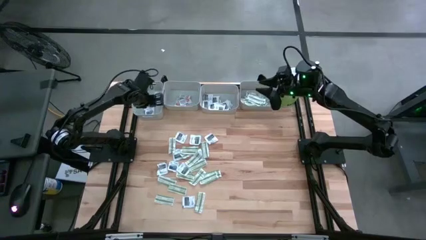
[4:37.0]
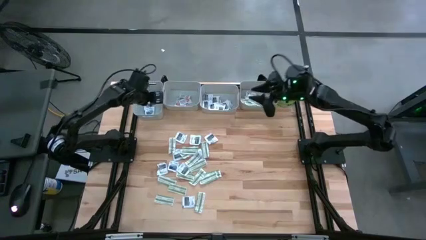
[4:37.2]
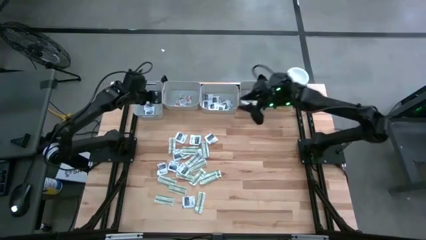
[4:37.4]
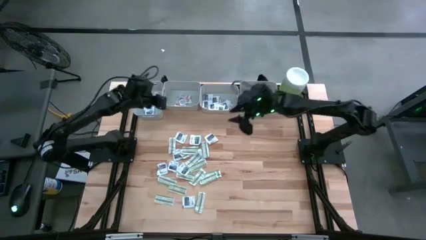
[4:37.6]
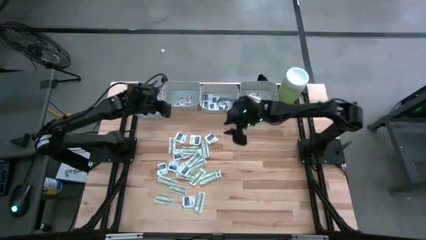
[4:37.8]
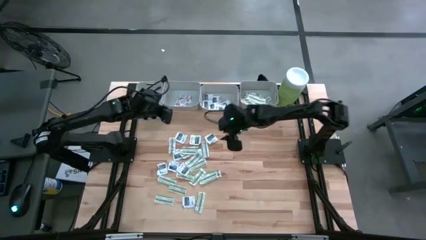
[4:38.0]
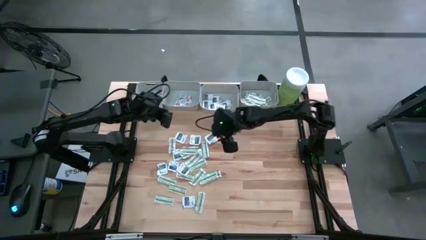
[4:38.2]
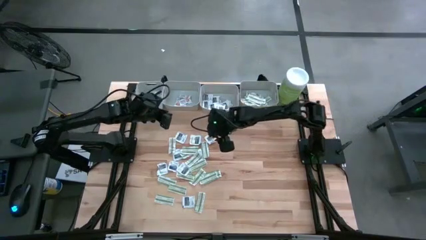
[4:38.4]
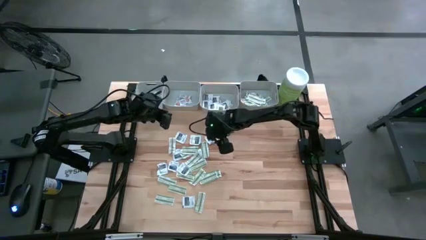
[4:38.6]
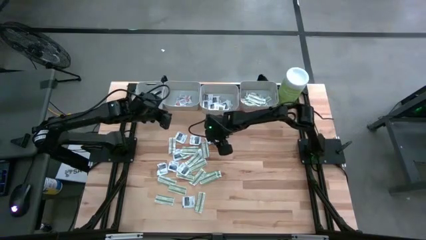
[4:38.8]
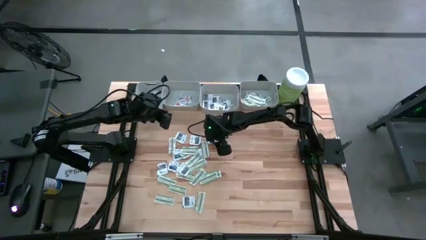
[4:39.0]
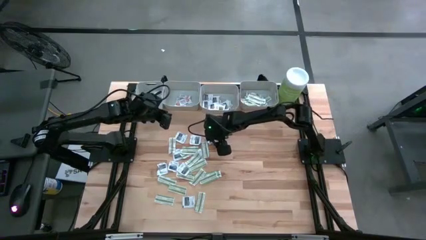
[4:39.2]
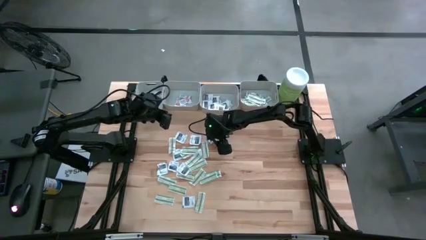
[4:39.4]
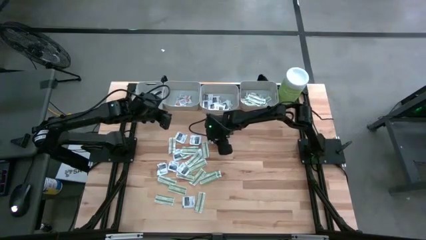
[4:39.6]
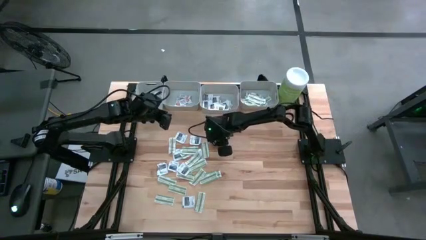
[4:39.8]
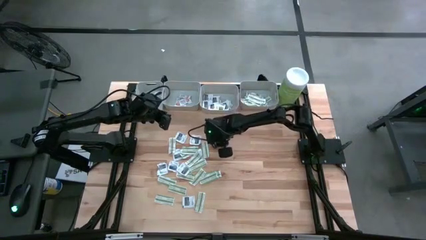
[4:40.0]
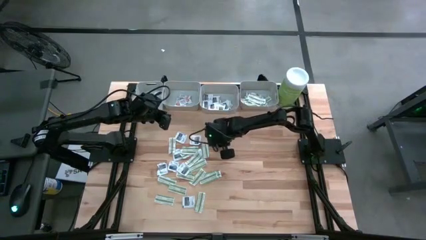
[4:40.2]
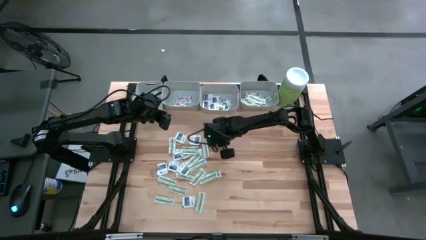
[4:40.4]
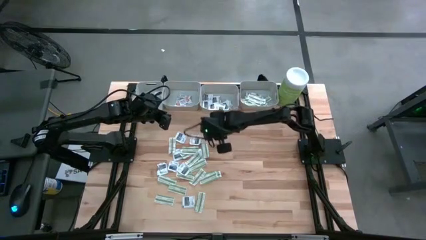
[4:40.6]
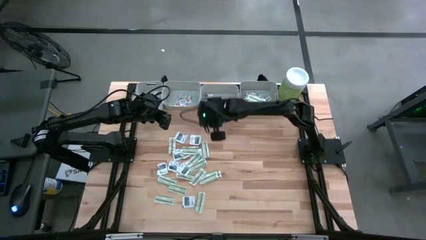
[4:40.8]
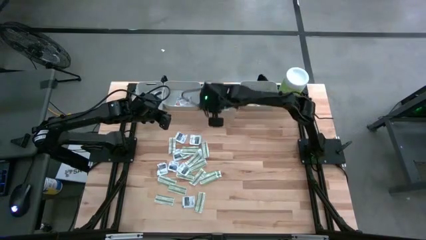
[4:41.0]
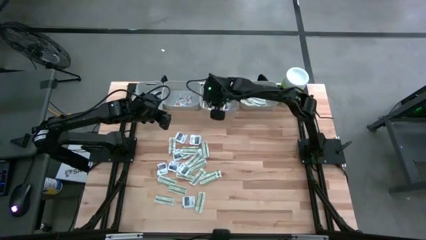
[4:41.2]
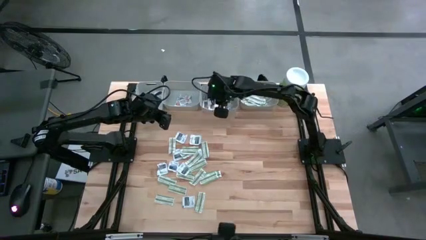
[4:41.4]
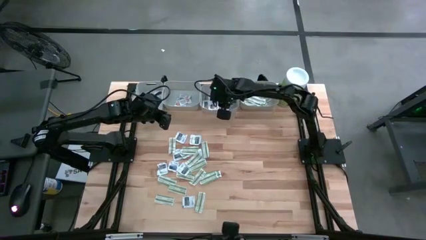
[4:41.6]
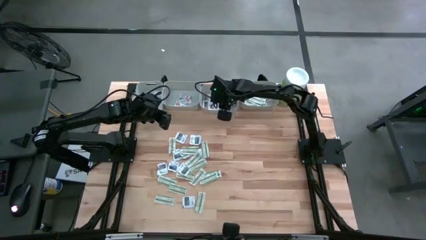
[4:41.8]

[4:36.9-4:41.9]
Task: Pick & Place First Aid Supplies
Put the gray towelette pack into the middle right gray bin

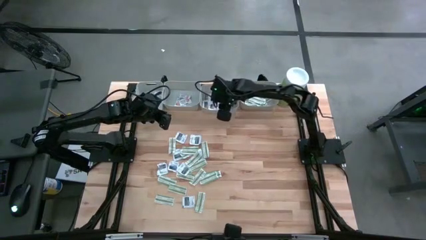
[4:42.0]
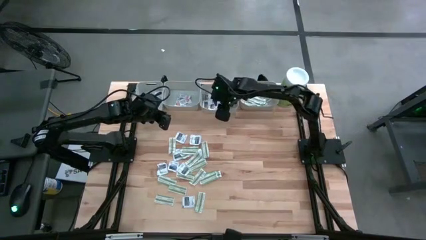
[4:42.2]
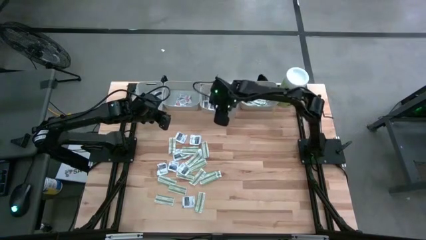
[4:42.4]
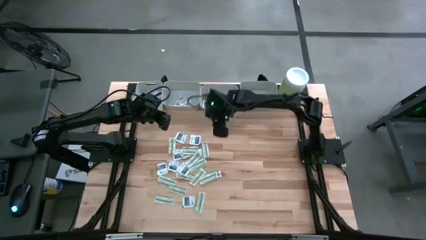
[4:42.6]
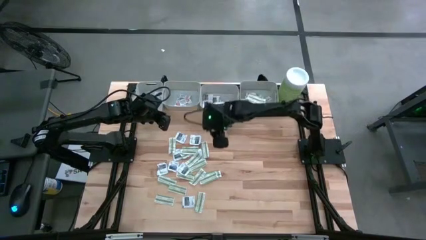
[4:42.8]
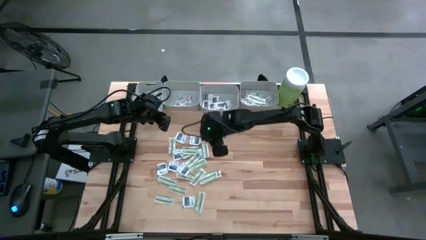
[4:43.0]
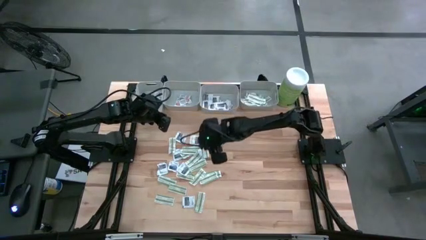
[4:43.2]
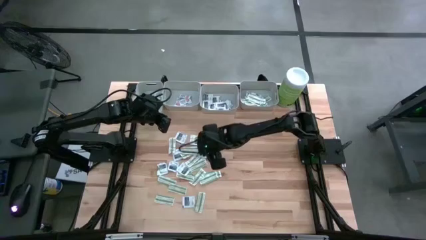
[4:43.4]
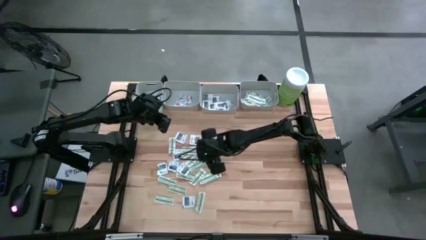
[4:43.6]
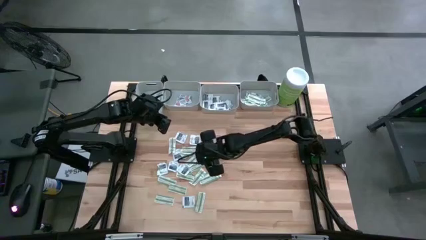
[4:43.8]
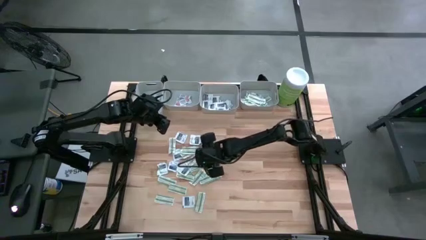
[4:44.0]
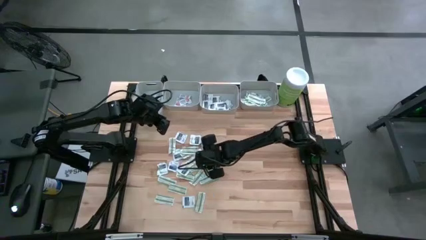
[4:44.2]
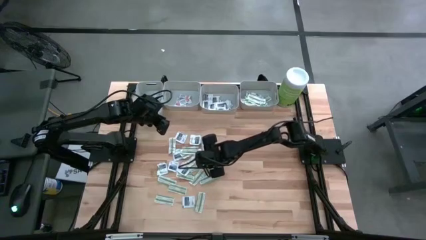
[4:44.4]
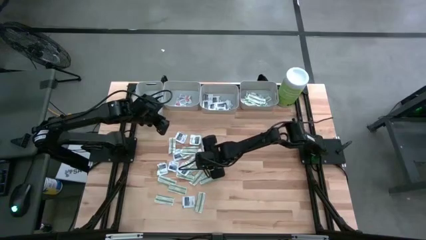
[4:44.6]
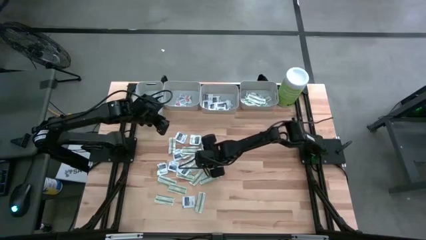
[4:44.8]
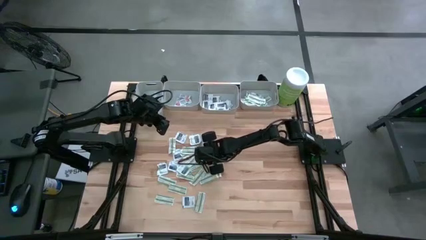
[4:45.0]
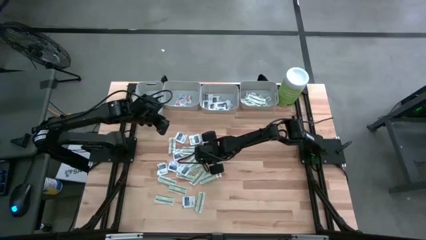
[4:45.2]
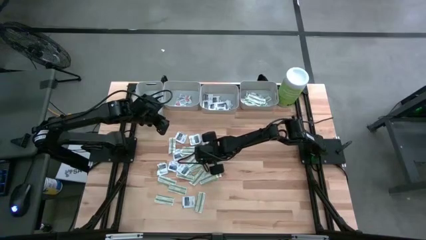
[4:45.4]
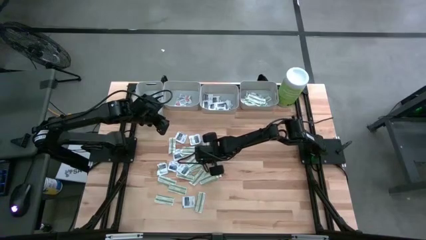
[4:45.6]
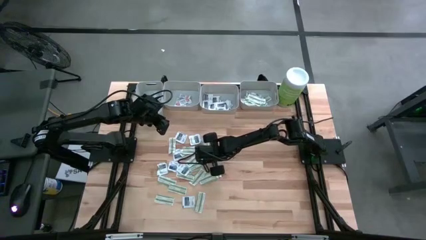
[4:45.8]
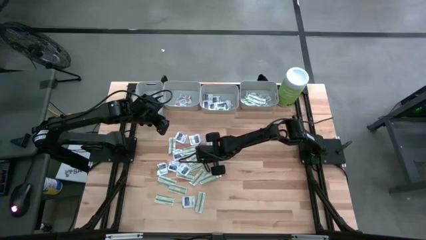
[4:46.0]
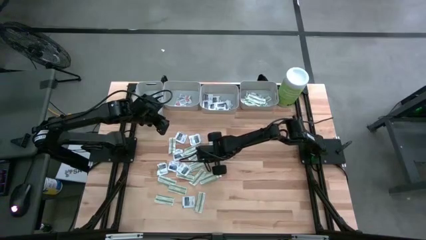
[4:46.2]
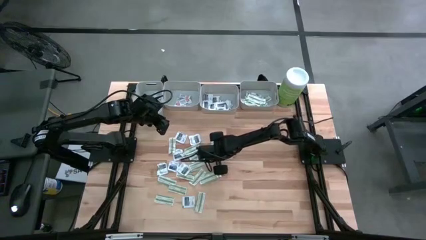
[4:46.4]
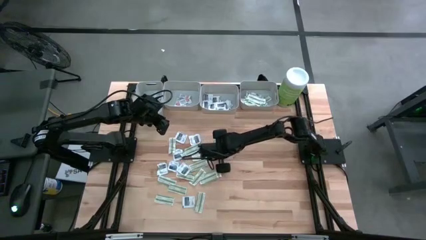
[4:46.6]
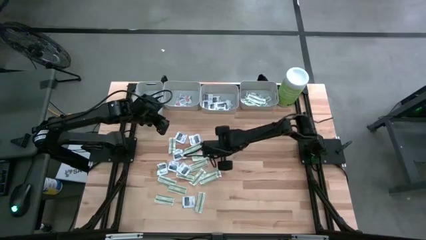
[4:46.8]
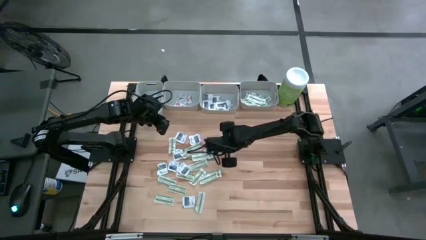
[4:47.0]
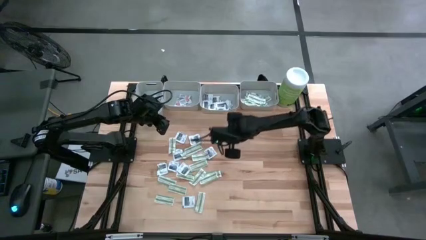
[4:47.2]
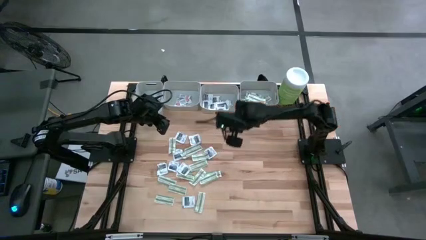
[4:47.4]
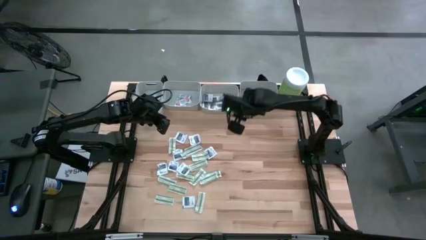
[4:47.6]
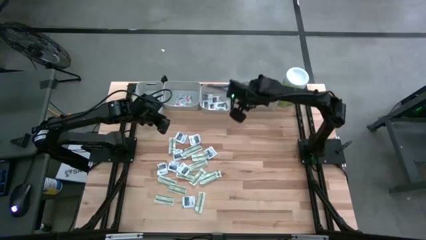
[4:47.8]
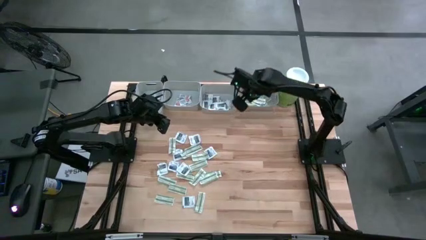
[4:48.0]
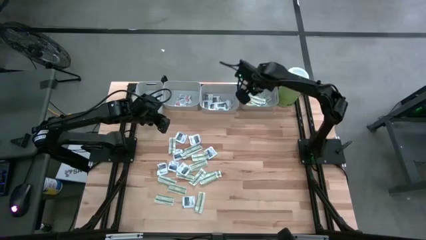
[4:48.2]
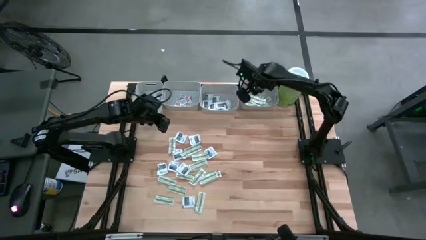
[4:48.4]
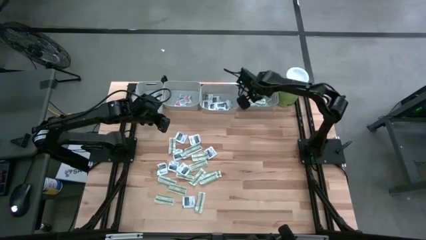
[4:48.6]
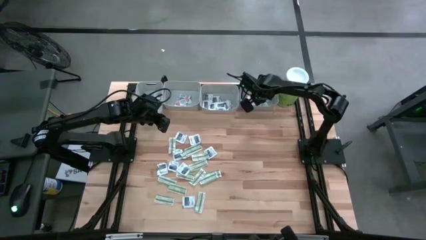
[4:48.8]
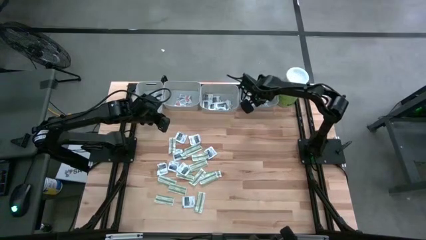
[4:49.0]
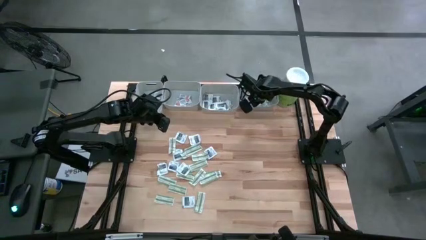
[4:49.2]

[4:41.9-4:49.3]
Put the green bandage into the right gray bin

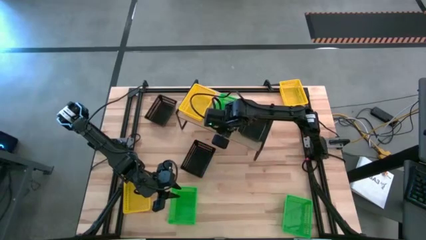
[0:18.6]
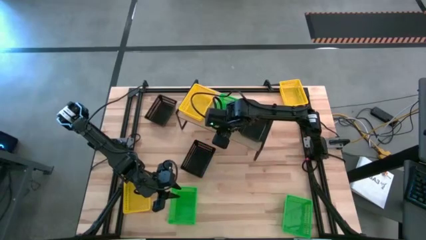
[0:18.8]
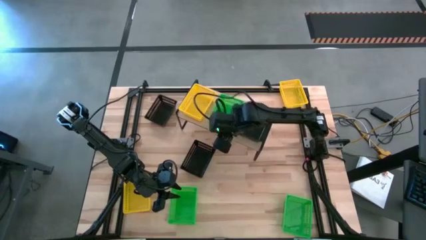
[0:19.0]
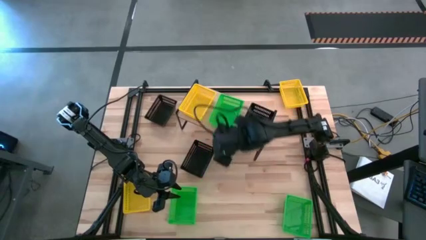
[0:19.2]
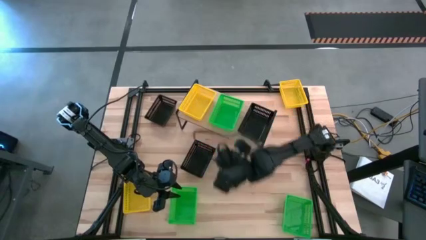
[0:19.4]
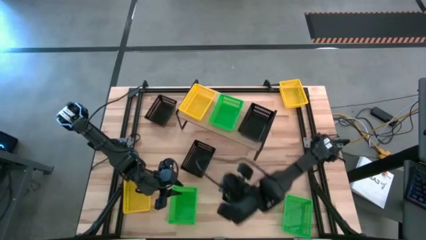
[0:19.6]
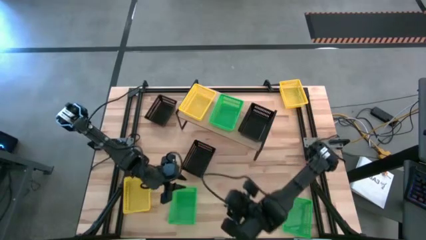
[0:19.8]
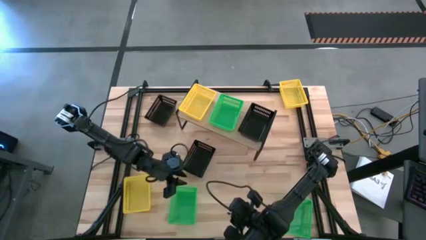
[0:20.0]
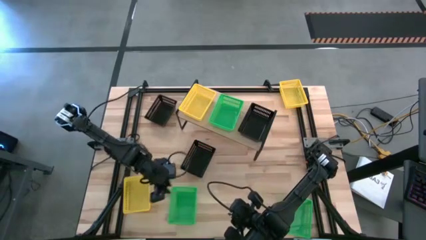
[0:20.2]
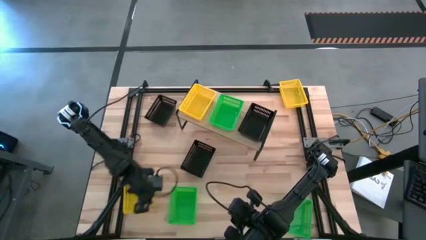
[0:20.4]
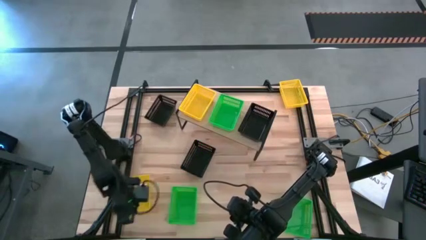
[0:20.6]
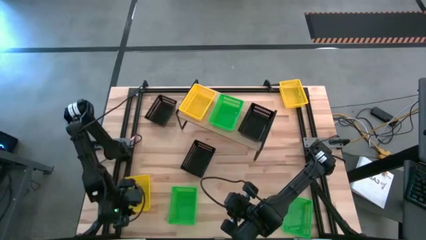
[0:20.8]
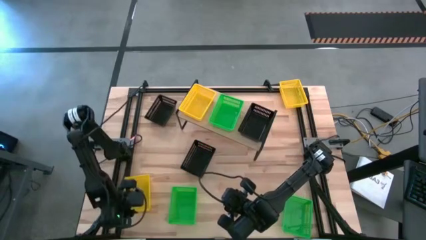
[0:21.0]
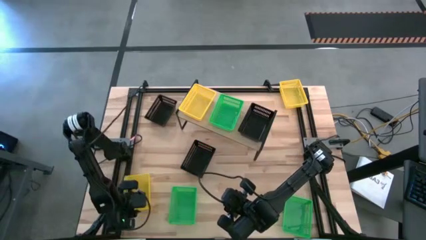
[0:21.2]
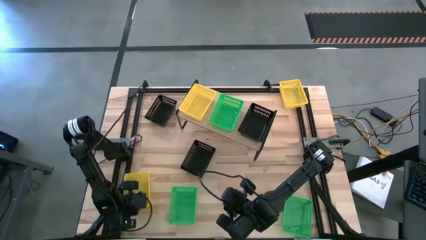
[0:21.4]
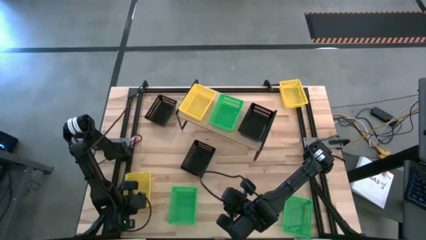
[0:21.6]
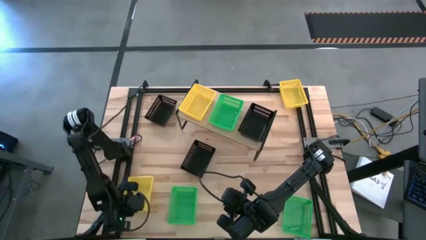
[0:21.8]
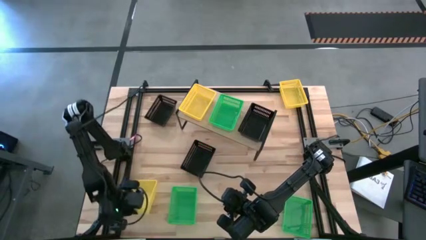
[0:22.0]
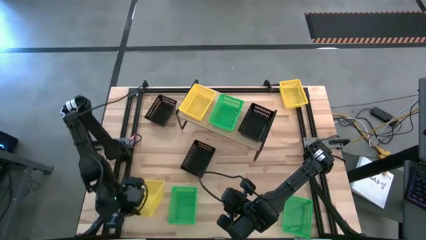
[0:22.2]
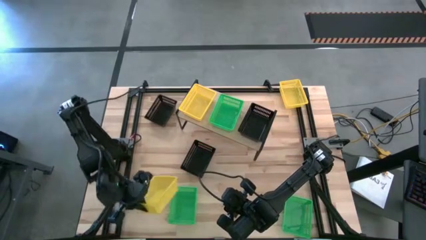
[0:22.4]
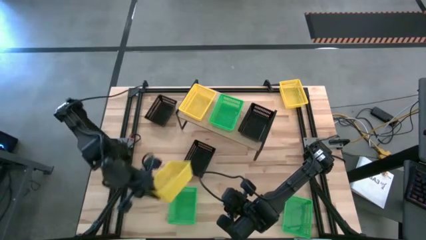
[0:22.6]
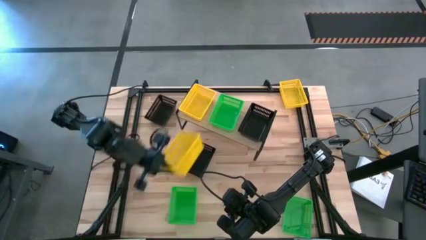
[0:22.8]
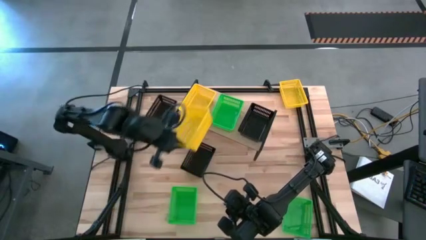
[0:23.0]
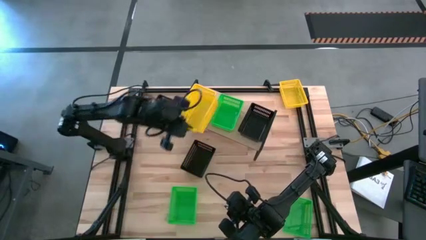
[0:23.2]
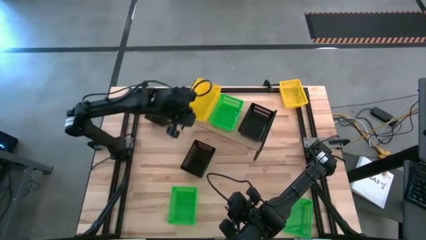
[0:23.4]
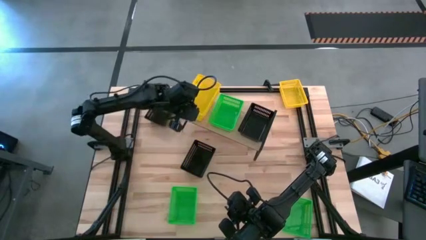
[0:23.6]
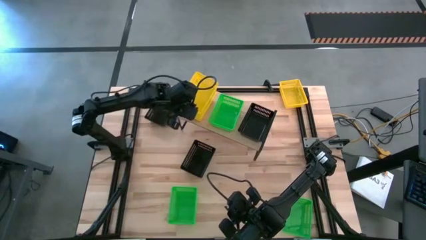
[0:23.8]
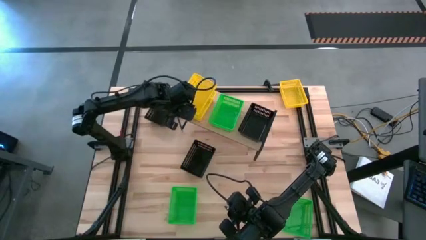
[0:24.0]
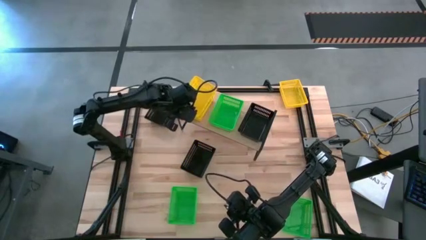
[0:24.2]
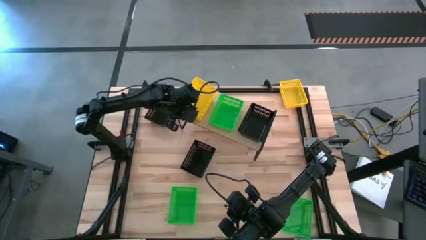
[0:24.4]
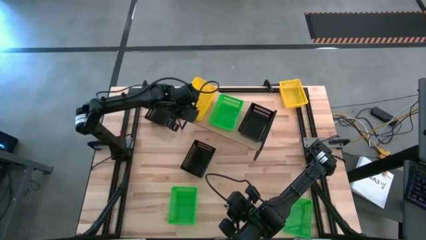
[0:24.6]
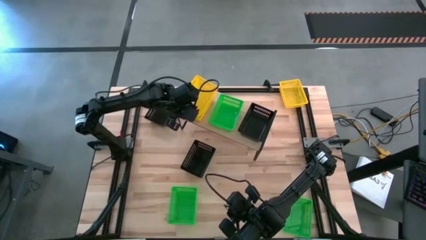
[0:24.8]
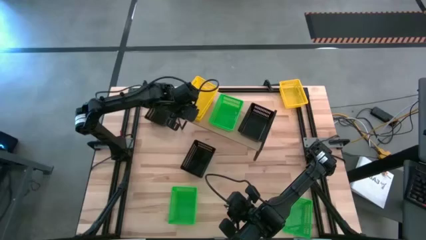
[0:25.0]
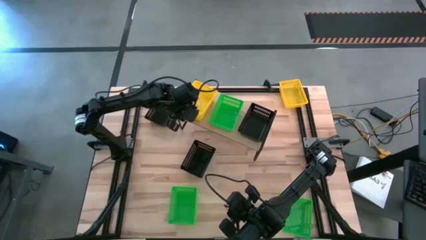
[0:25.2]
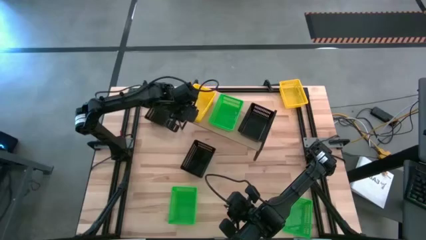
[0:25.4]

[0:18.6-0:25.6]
Task: Stack baskets on shelf by color
Stack the bottom yellow bin on top of the yellow bin
